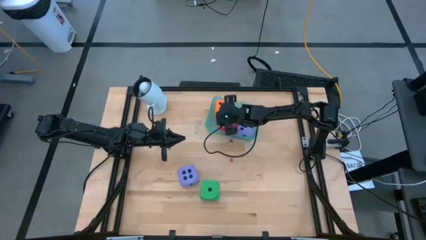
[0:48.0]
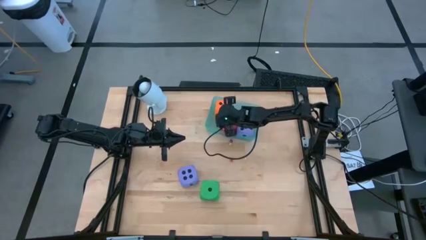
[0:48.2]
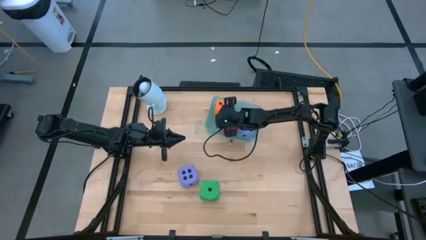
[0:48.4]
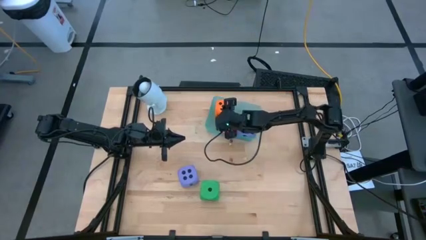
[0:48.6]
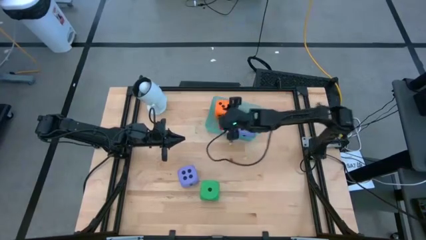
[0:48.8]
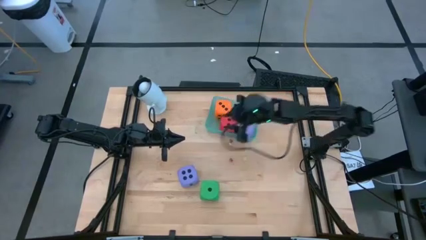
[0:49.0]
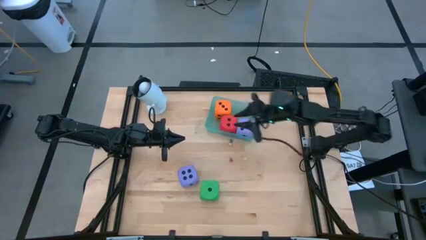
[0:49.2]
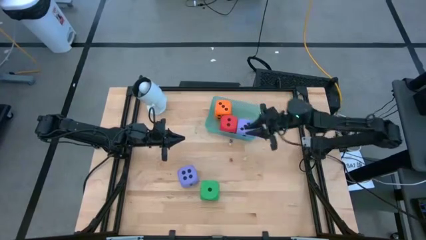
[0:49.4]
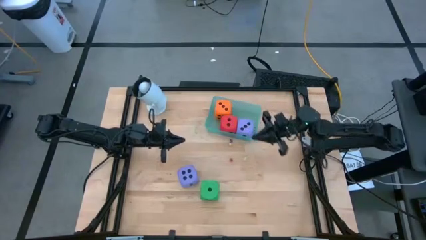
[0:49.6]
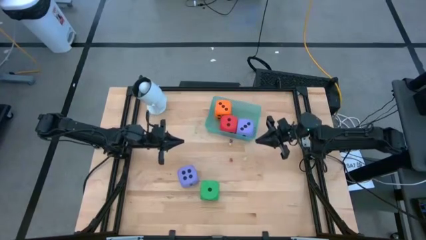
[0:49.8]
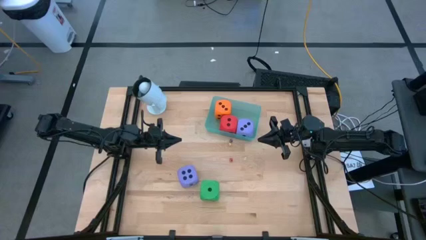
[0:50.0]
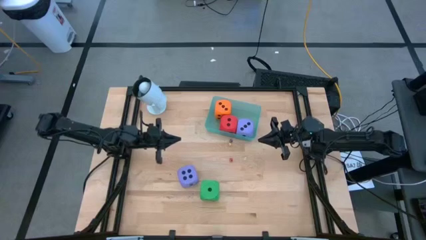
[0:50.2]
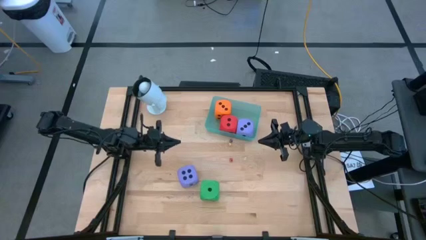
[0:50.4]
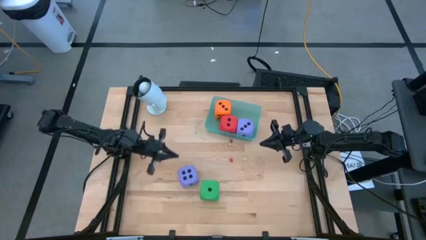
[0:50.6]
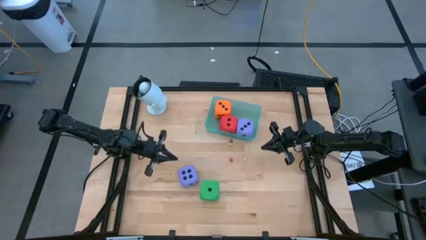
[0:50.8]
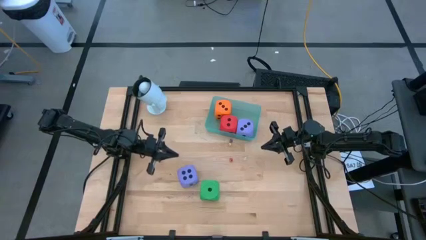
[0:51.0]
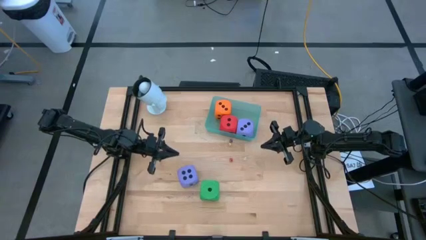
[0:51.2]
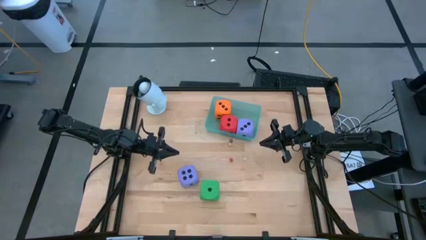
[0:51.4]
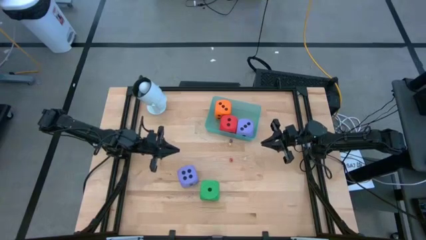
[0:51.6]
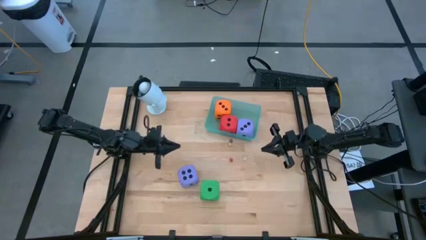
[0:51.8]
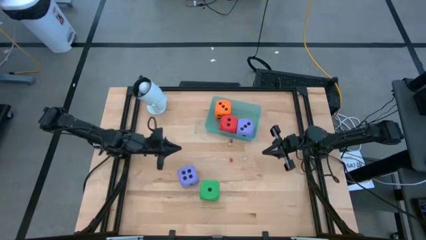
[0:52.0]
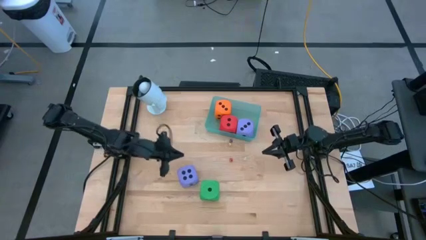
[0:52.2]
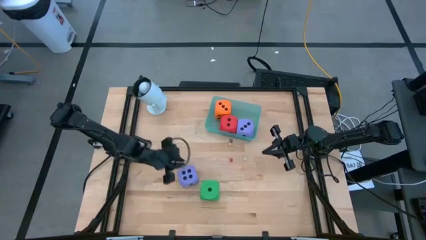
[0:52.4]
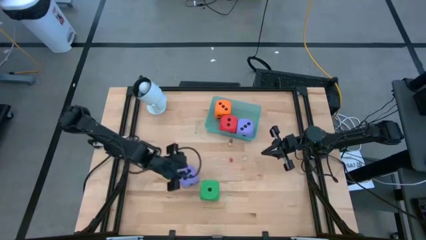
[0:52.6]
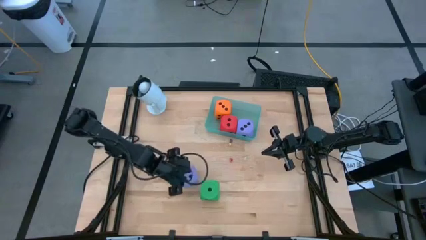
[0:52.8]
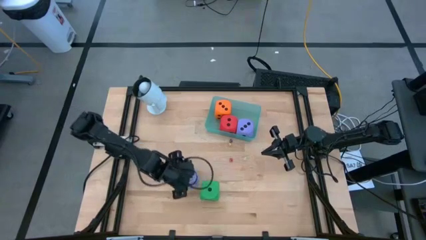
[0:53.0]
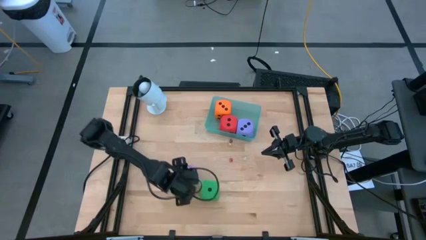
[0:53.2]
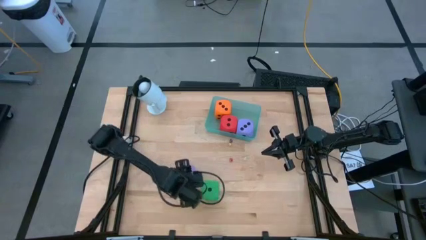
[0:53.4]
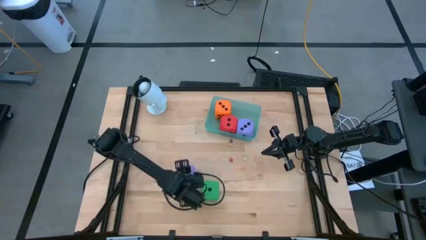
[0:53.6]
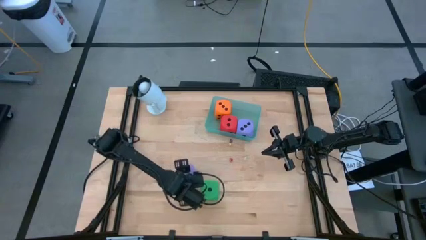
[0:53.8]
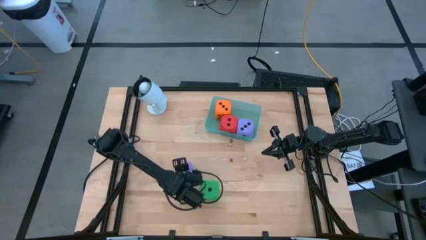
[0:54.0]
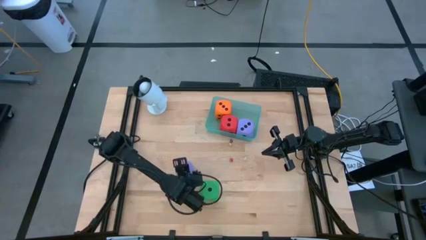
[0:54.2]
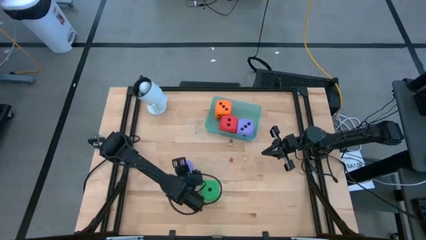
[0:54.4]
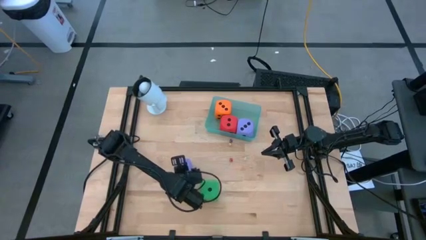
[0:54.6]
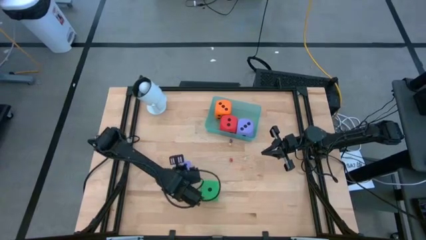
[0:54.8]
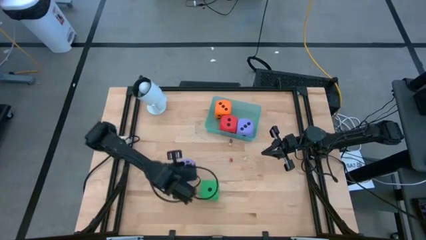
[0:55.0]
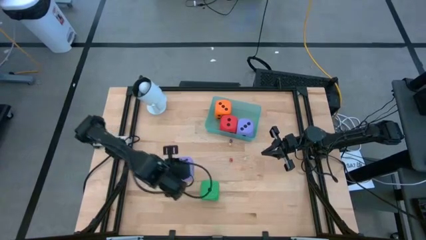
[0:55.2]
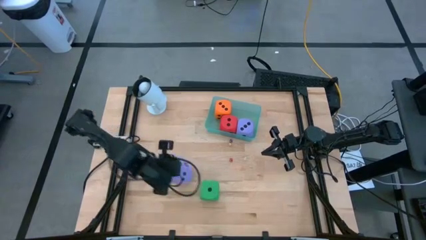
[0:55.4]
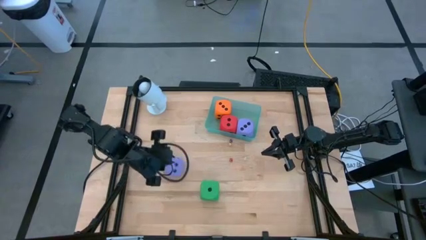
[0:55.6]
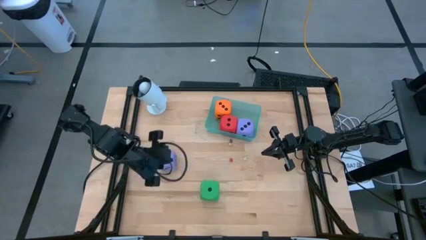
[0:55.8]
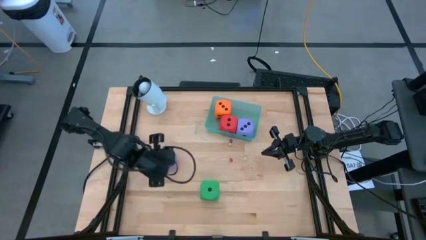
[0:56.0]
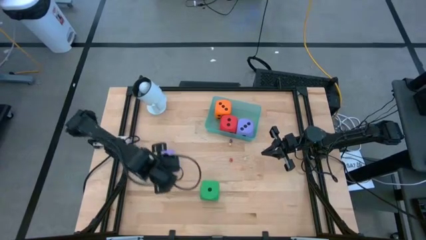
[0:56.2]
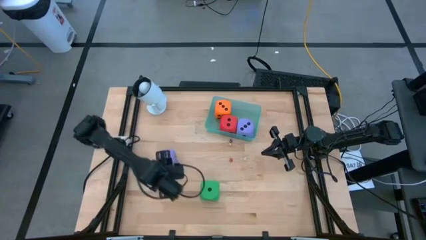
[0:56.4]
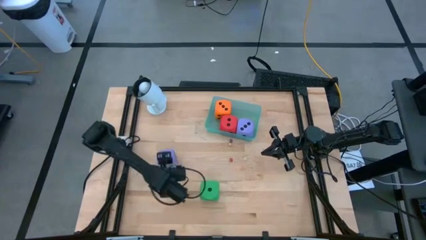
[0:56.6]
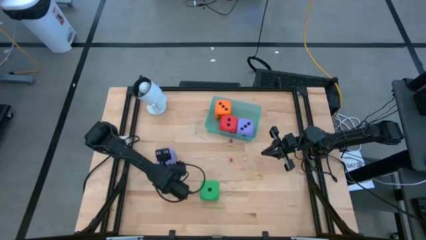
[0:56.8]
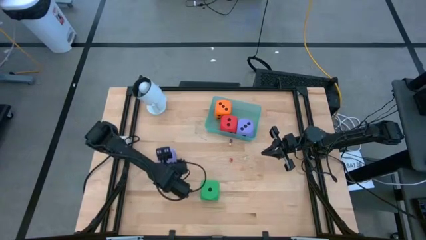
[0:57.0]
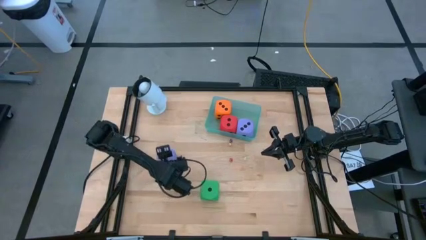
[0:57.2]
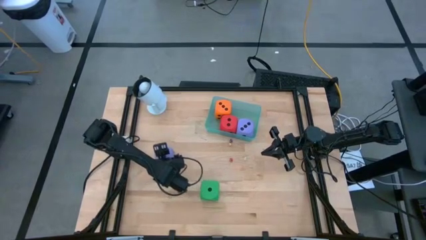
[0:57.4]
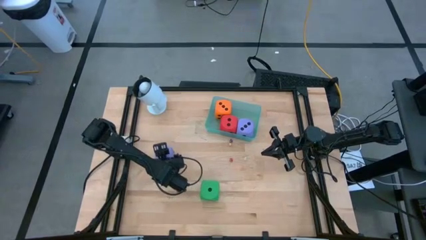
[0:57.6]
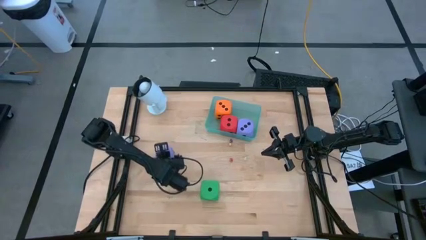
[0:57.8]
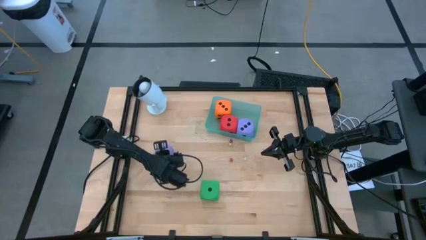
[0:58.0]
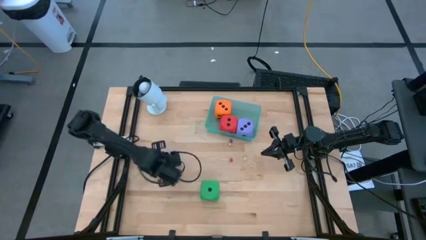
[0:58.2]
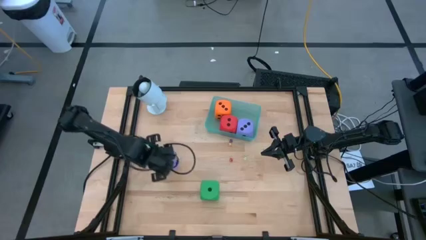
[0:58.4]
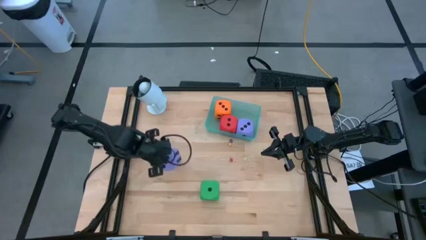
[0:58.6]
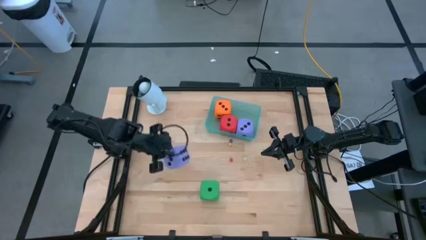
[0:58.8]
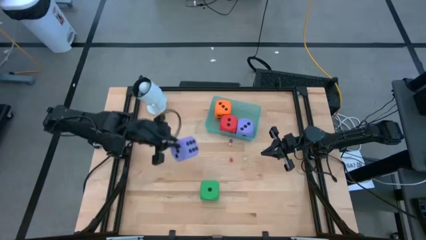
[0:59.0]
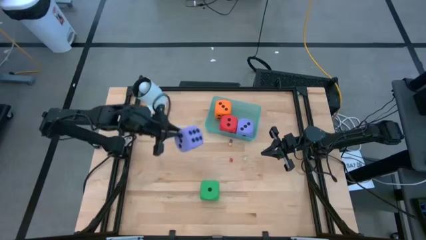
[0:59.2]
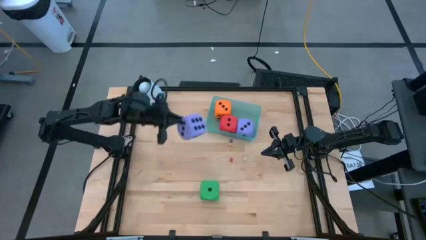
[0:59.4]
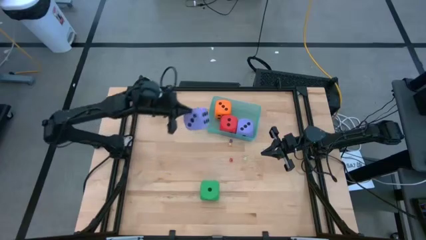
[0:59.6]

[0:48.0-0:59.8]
Task: Pick & Place Dice
Put the large purple die into the blue bin

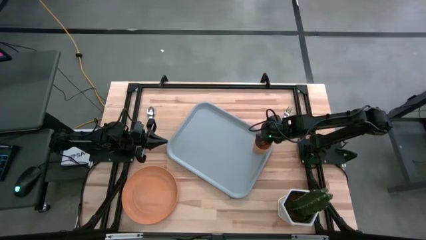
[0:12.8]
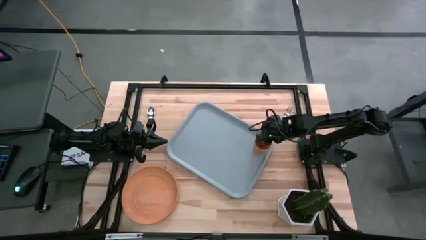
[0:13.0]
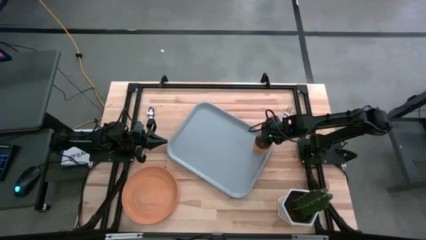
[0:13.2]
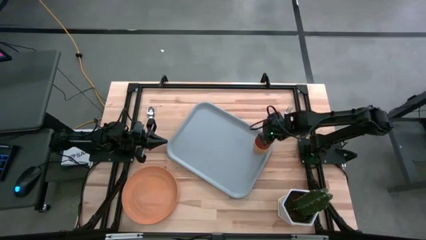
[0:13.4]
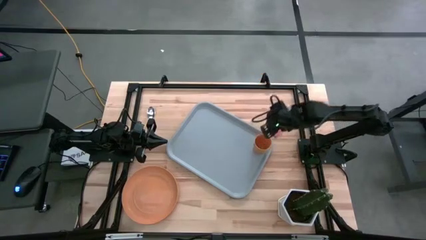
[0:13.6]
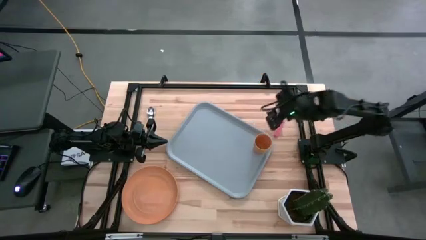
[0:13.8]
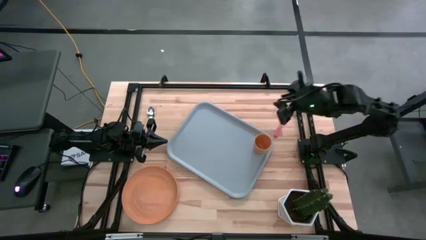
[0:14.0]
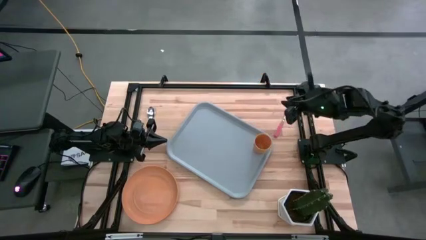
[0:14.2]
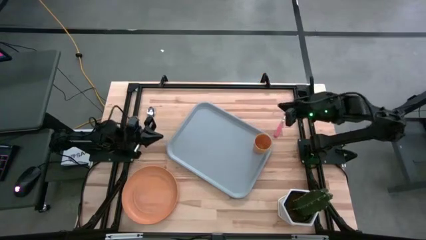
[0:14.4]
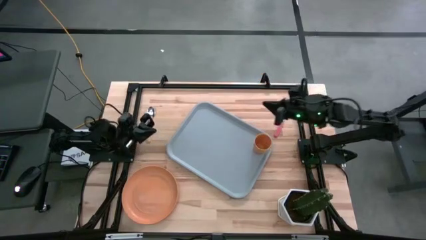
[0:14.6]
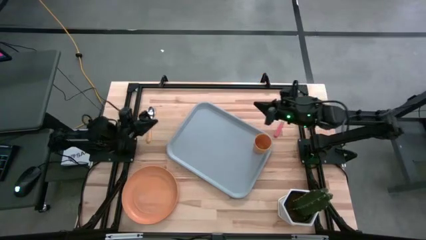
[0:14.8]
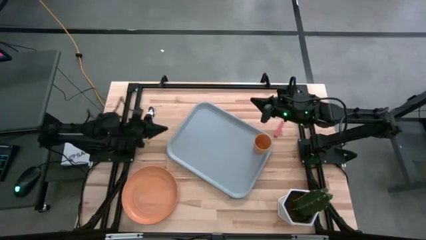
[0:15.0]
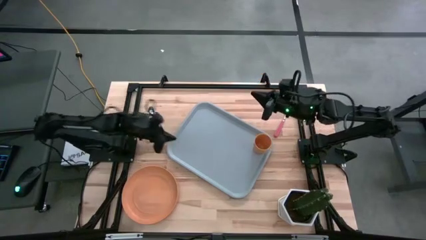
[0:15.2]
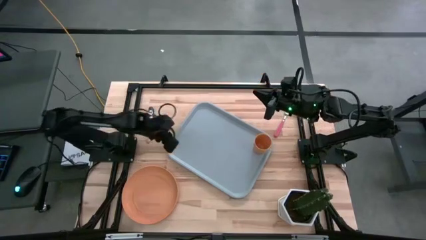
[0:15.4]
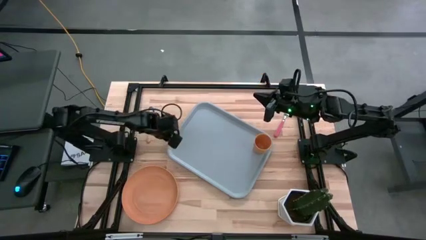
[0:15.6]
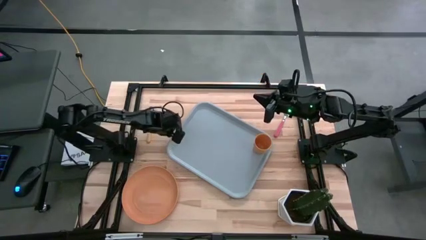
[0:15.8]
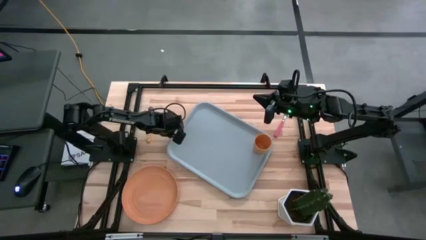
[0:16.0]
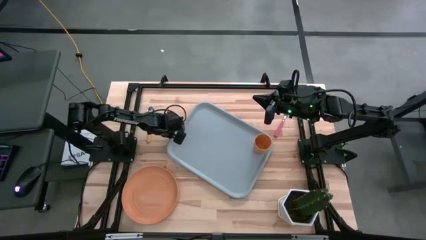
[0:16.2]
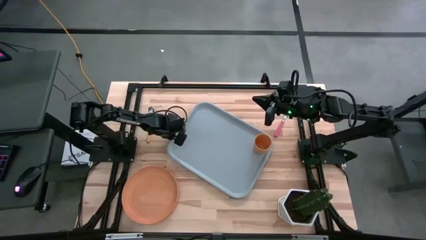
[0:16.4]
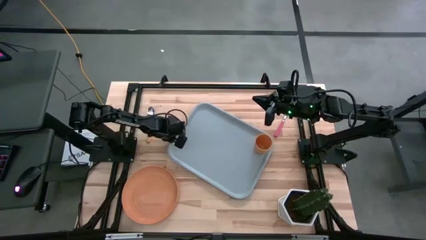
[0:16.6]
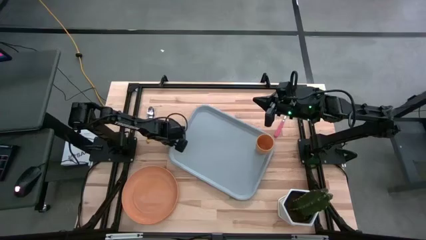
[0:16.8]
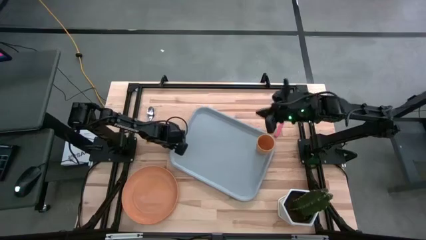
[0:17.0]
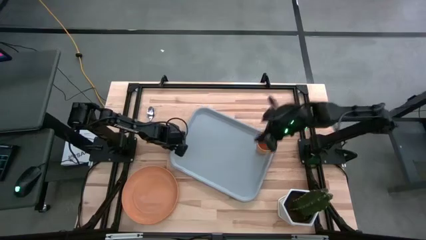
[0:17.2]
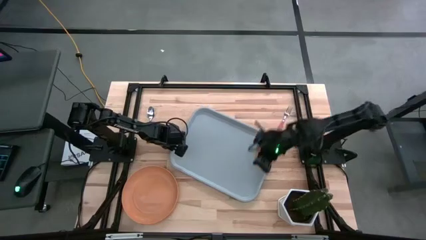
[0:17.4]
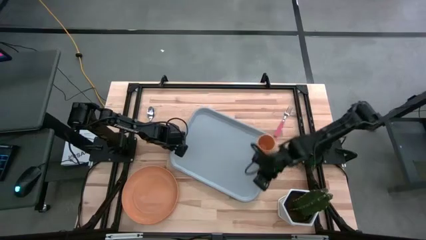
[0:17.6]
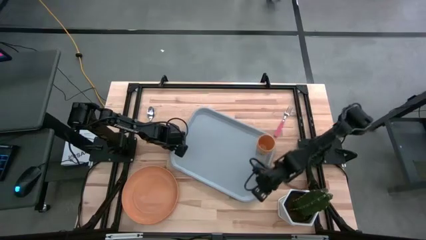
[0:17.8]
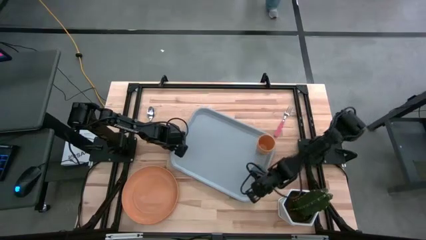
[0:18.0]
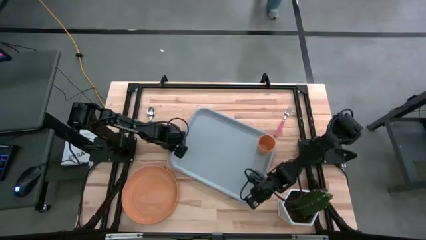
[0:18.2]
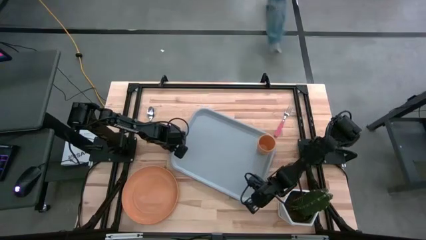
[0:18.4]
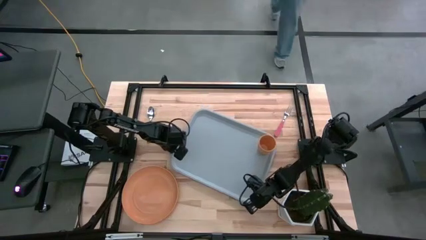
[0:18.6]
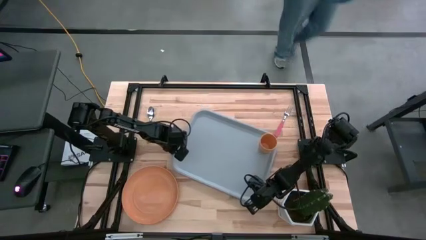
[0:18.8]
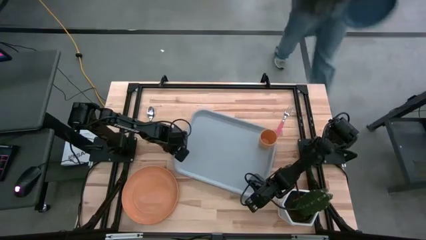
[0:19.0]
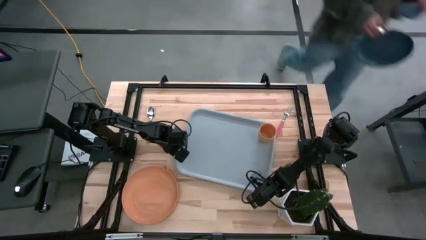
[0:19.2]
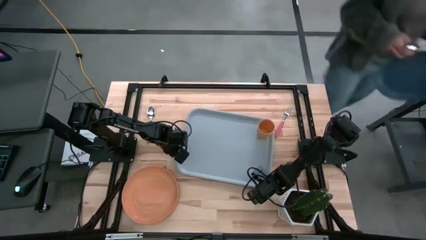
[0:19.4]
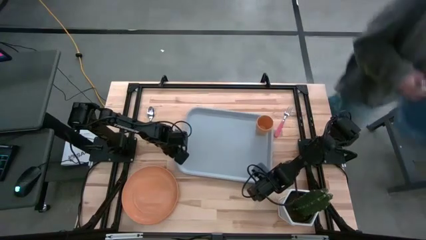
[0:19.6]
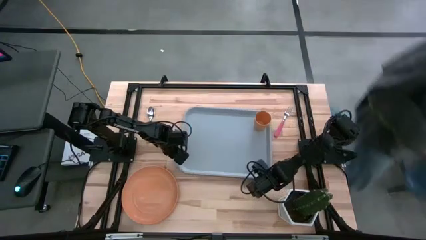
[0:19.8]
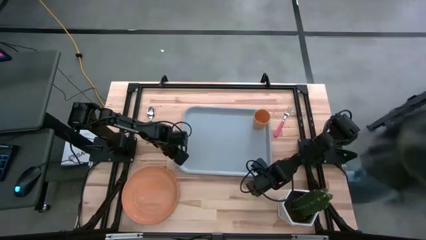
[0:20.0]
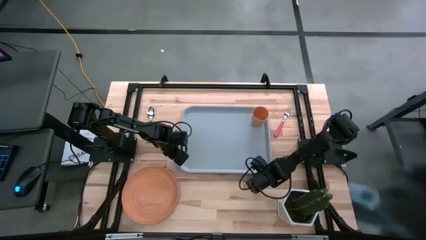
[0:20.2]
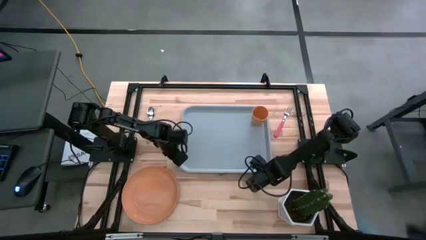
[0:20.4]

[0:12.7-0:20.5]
Task: Pick and place plate/cup/fork/spoon on tray
Adjust the gray tray
